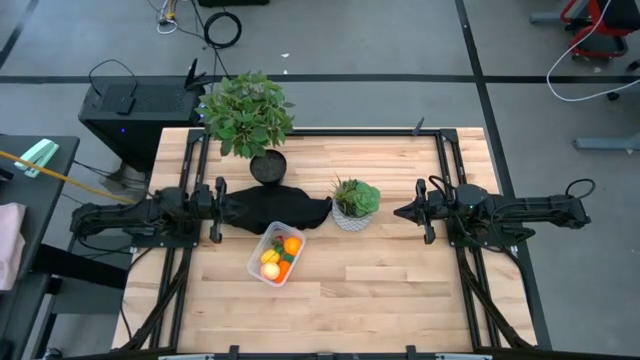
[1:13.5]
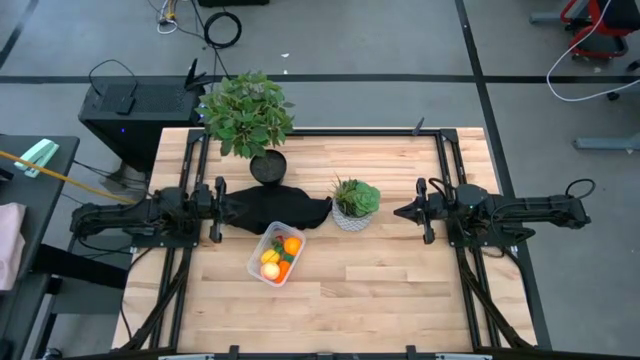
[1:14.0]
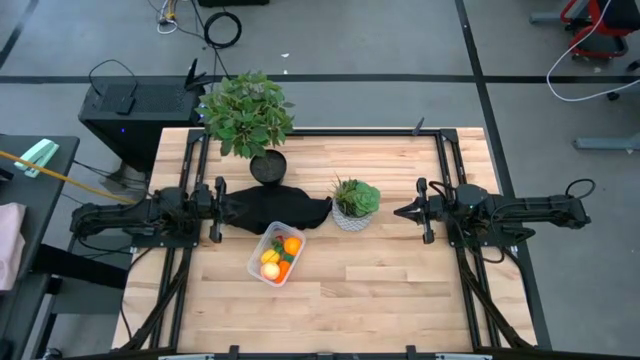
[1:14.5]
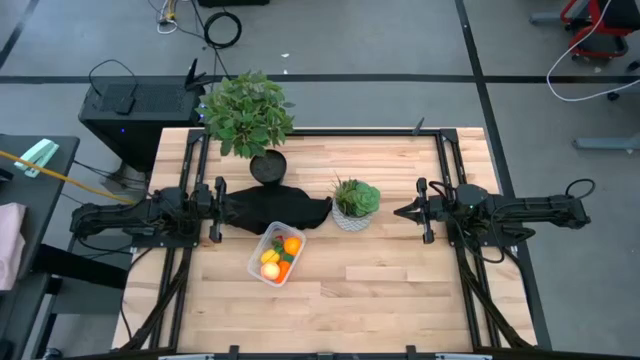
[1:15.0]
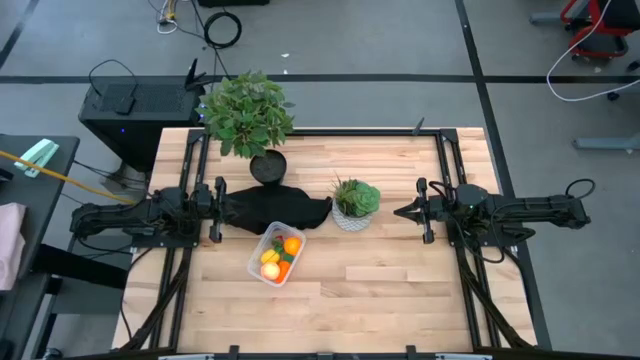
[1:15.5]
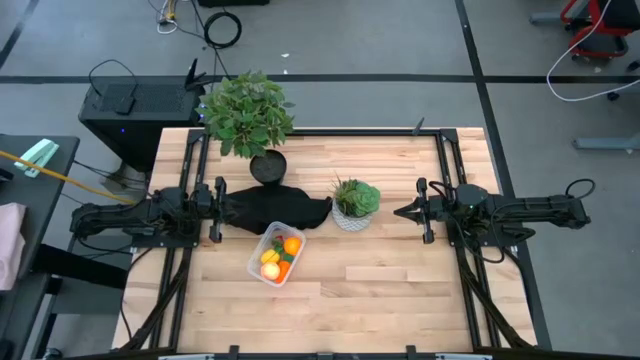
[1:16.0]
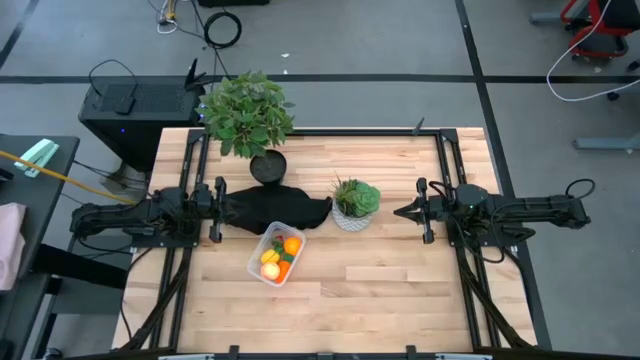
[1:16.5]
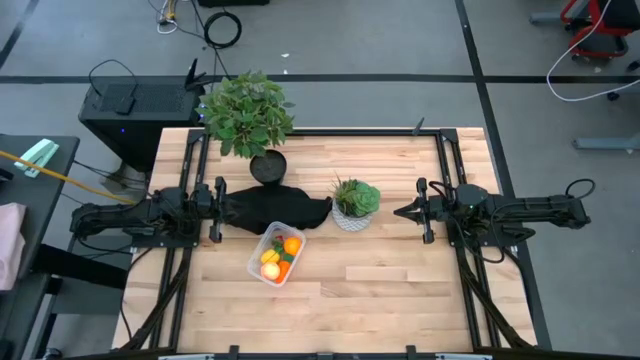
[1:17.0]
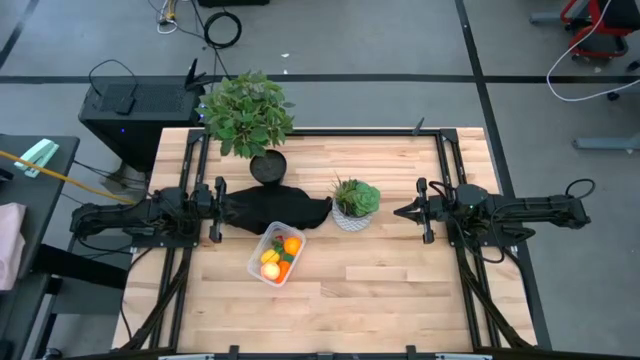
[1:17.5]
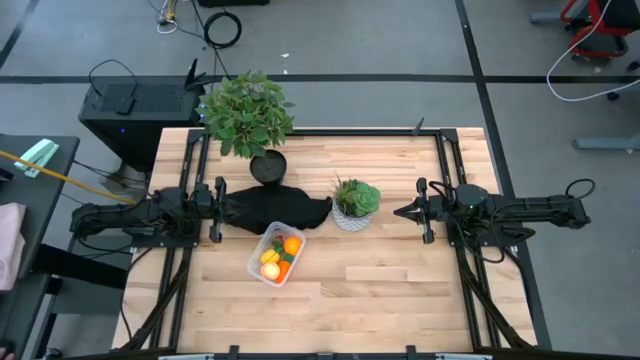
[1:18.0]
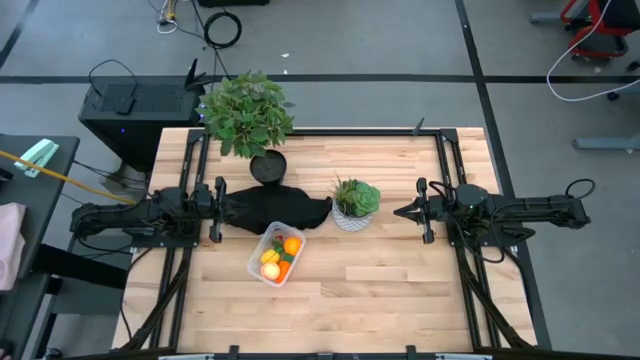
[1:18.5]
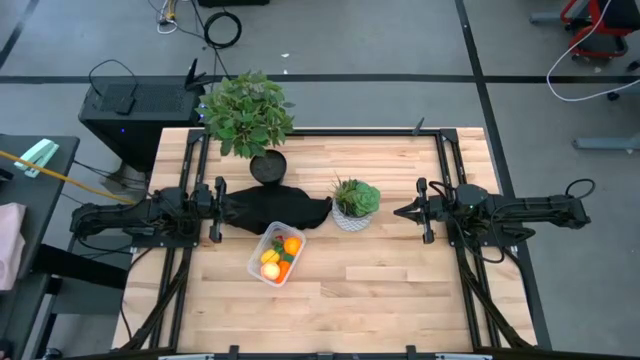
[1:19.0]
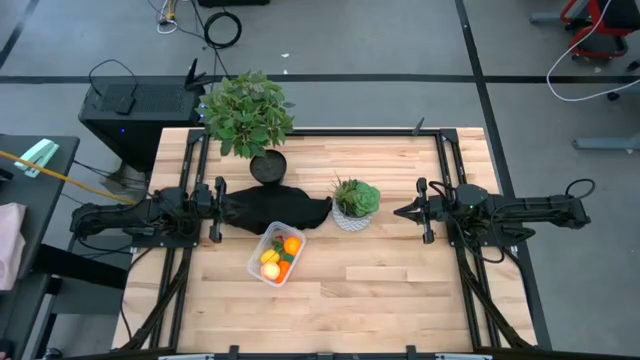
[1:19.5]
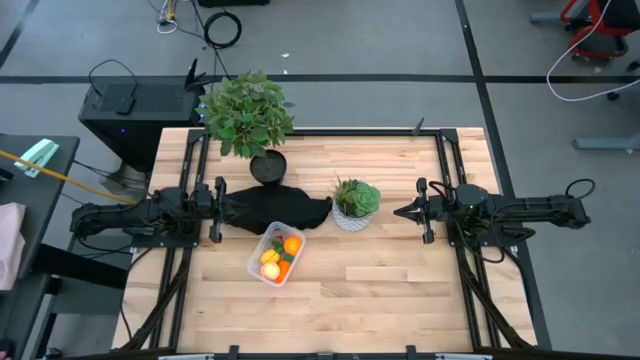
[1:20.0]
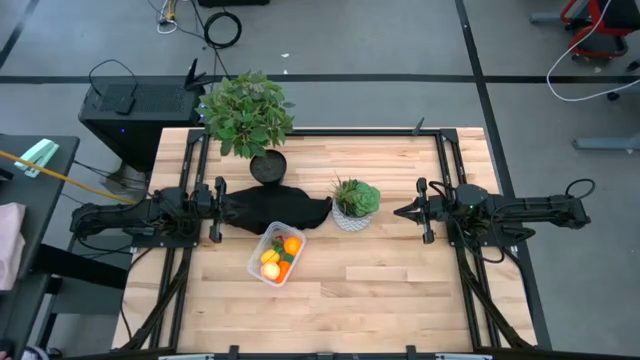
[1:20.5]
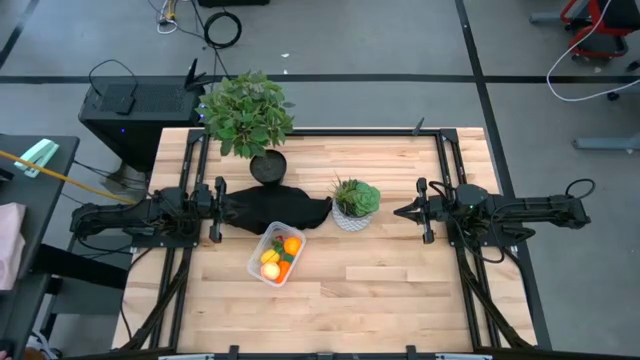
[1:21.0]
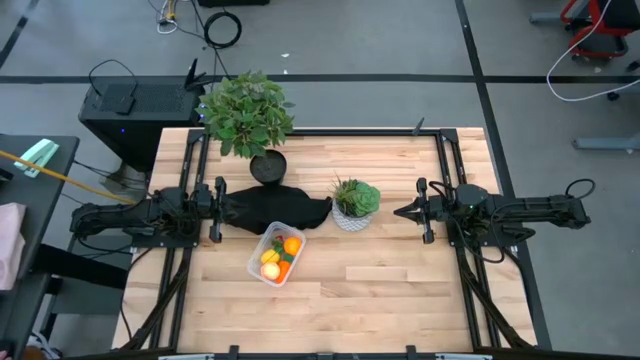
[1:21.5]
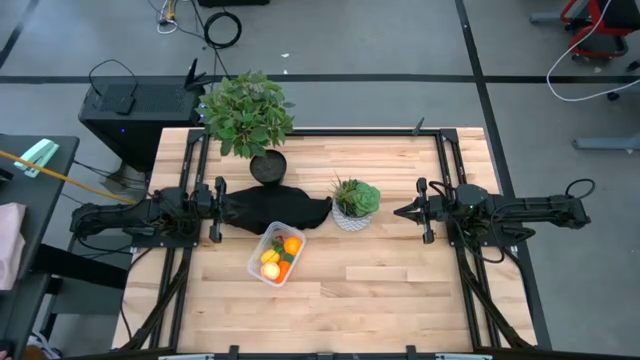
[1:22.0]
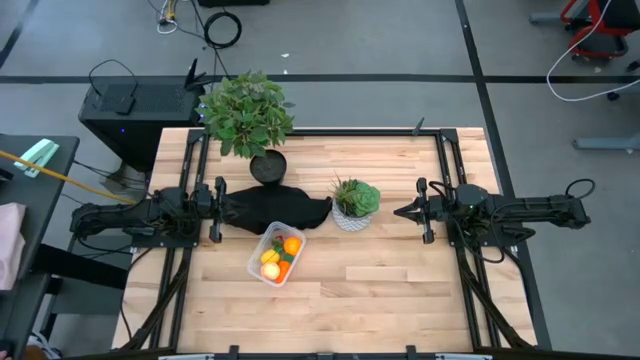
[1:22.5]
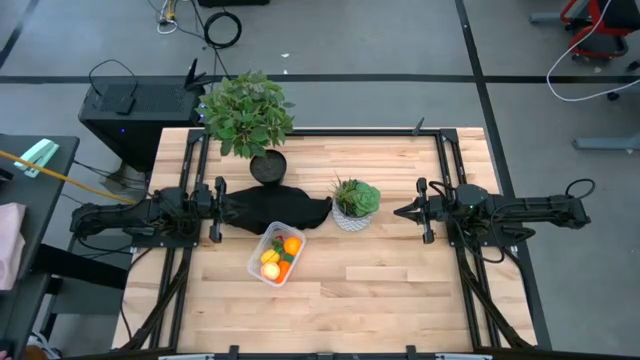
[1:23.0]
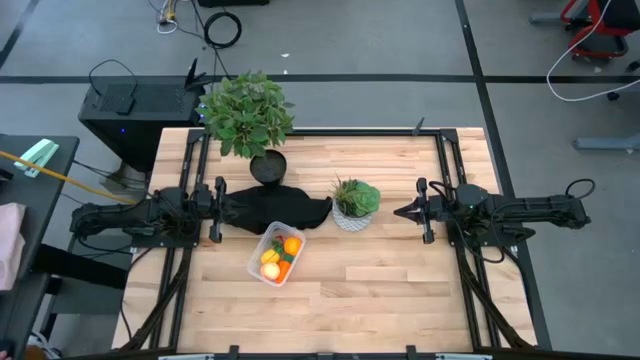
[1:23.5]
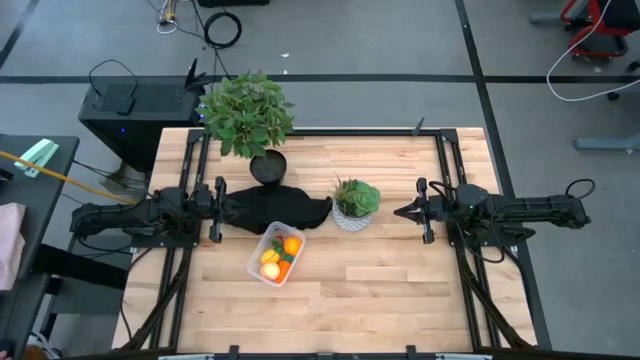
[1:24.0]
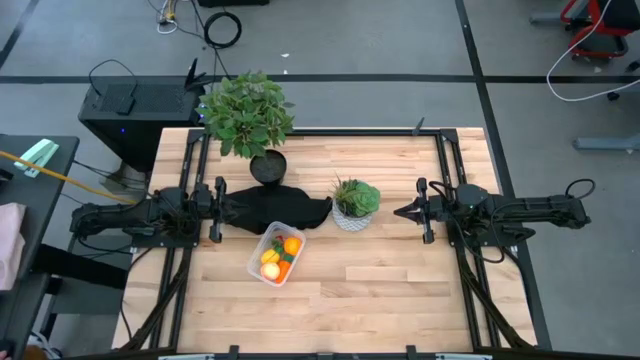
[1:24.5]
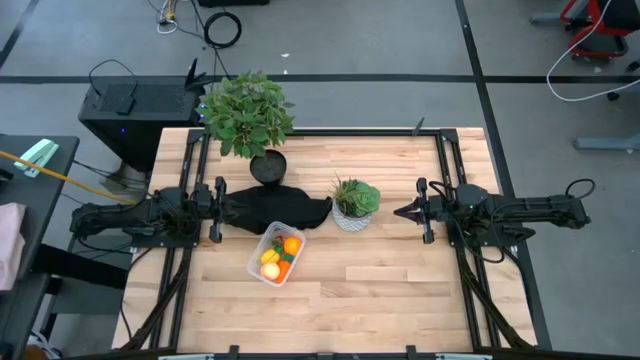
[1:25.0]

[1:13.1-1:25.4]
Task: Pick and placing Produce into tupperware
Return to Home Position

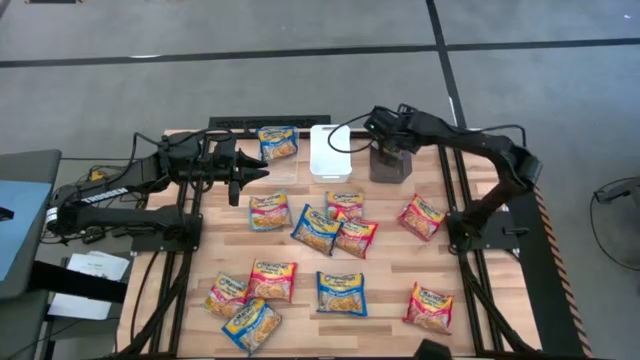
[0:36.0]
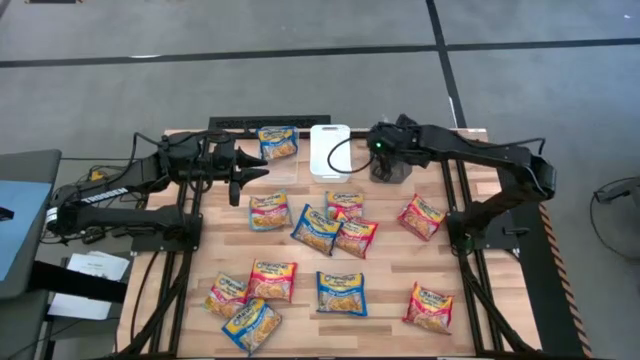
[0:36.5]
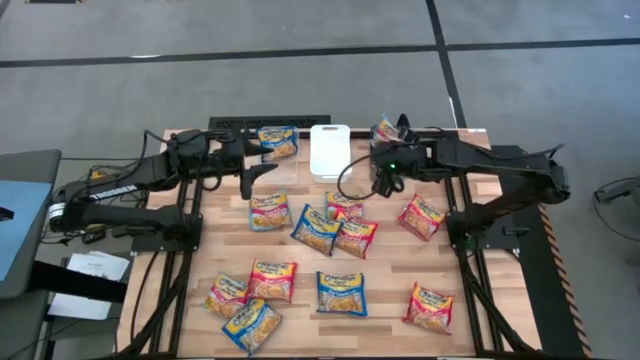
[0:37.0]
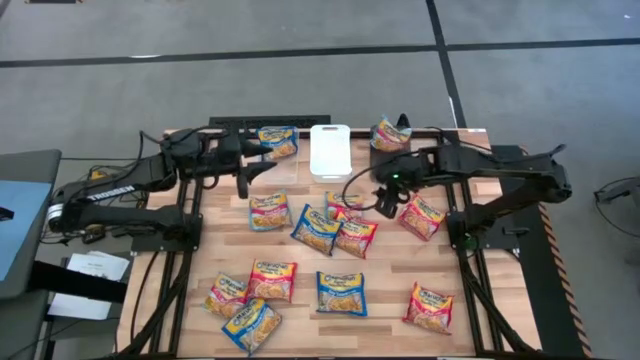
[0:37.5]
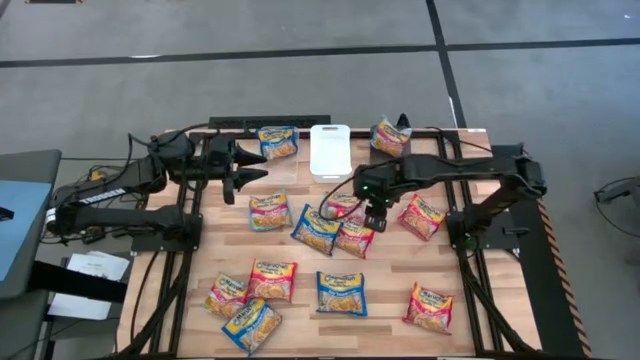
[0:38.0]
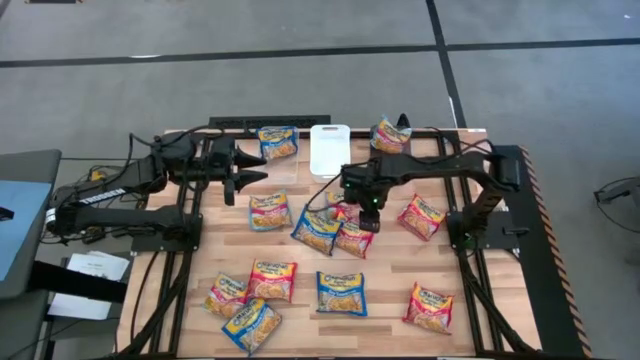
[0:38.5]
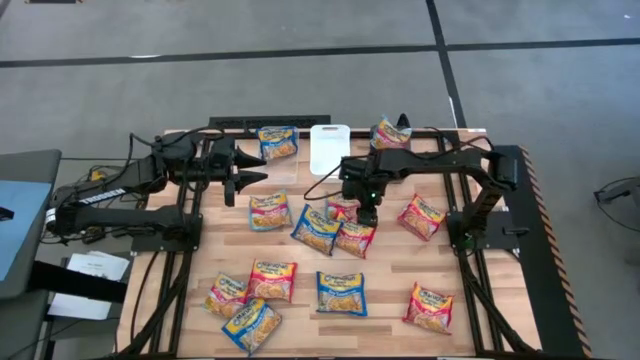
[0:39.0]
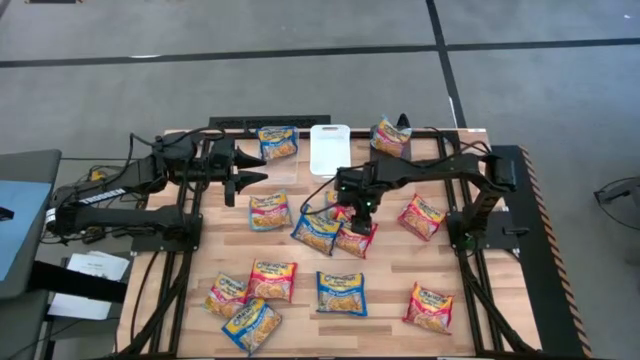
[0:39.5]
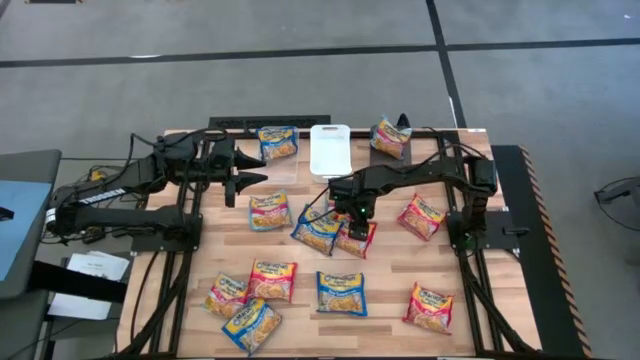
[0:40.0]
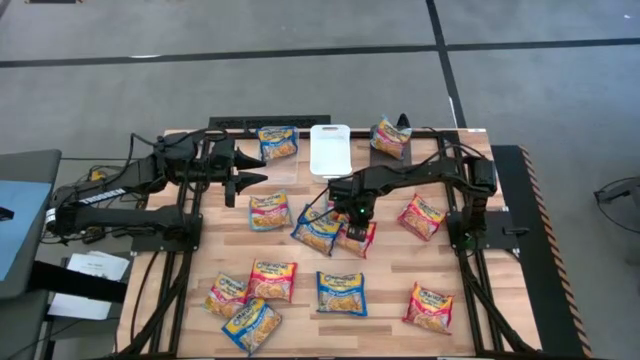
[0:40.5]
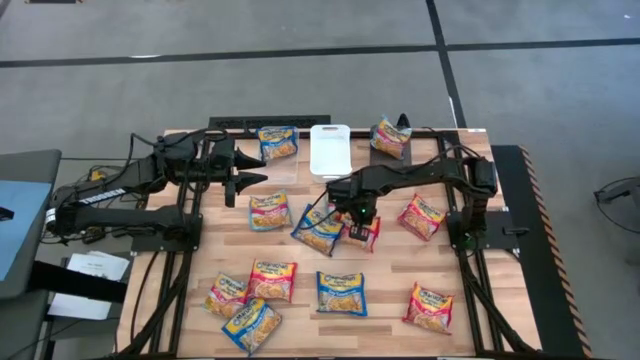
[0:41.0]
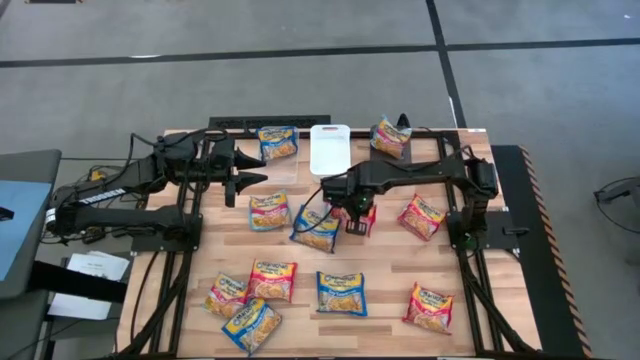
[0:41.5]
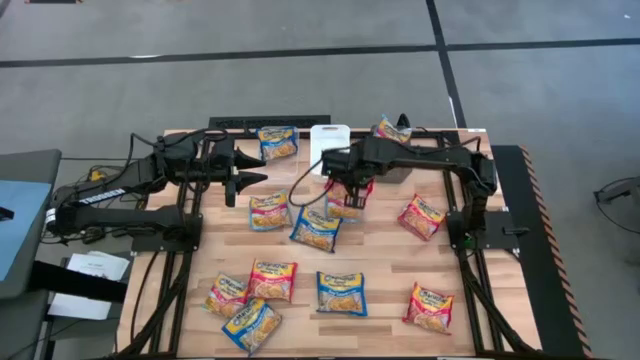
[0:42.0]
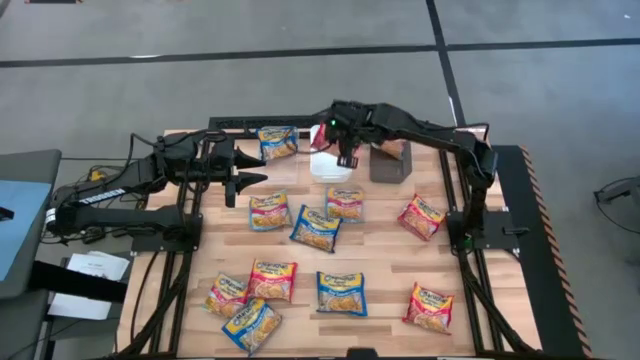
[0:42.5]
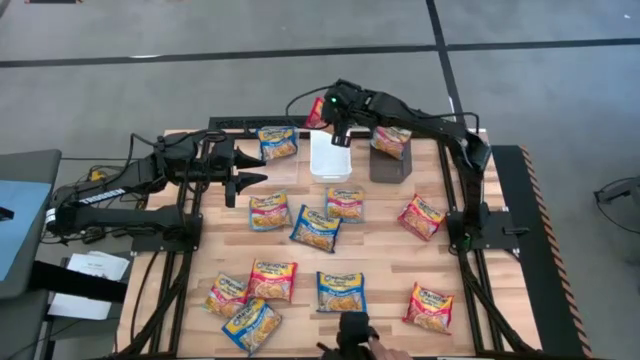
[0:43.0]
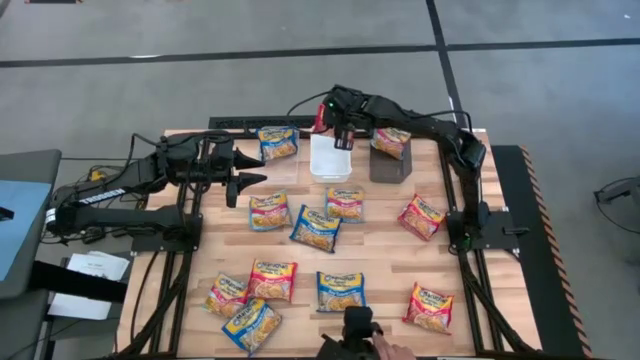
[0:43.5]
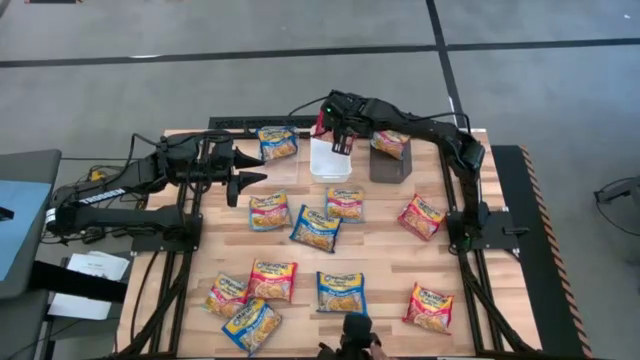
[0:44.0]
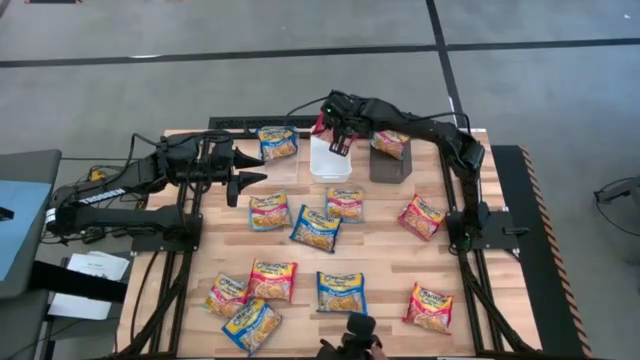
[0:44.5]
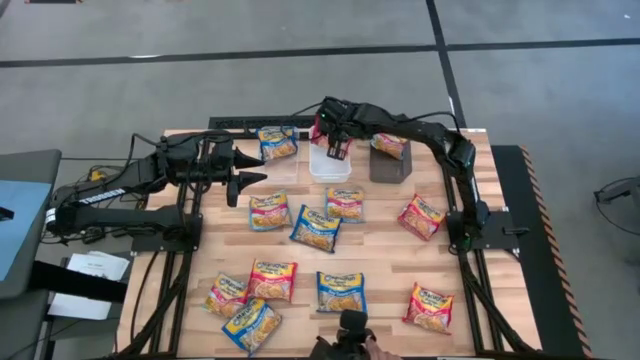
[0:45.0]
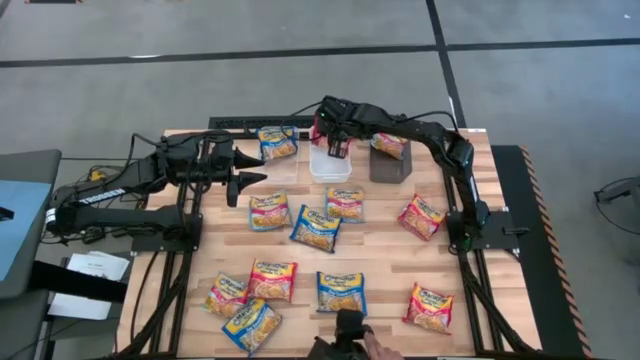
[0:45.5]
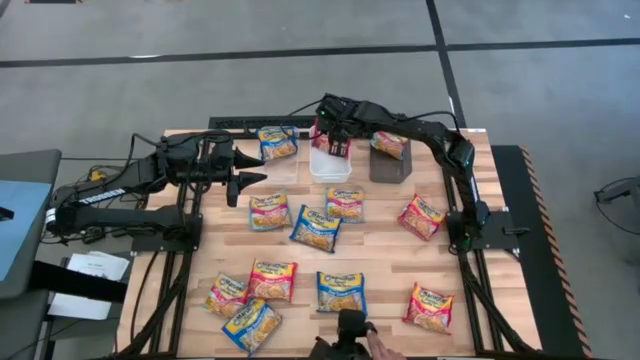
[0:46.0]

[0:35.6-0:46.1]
Task: Sort Maruchan noodles
Put the red noodle pack into the white bin
